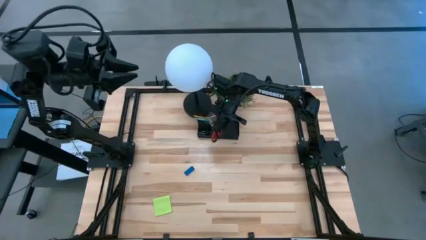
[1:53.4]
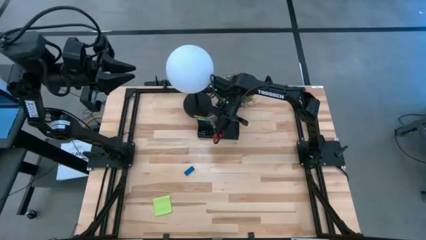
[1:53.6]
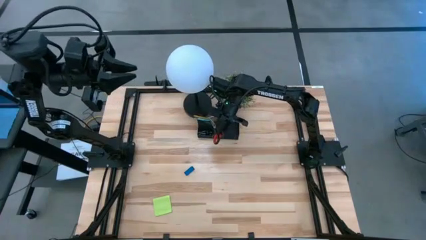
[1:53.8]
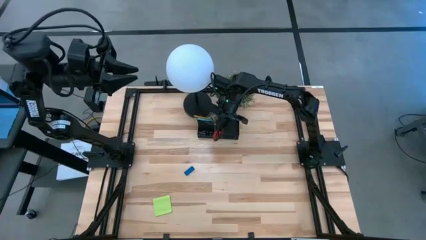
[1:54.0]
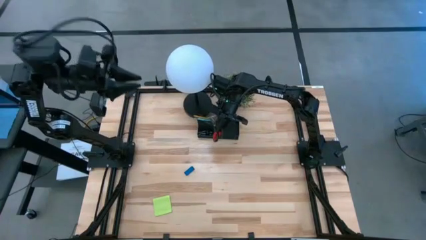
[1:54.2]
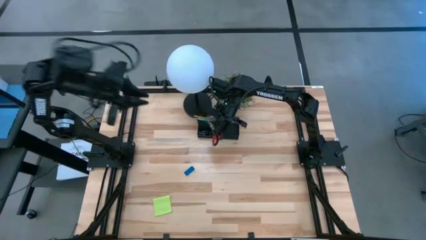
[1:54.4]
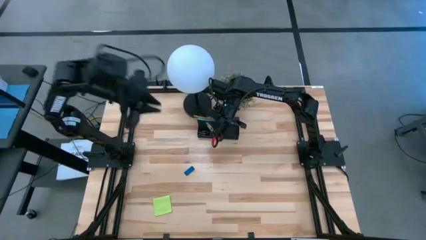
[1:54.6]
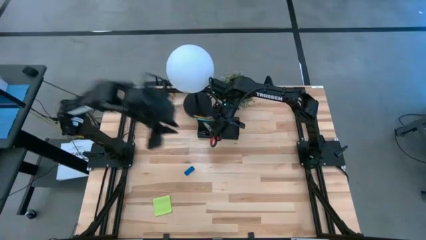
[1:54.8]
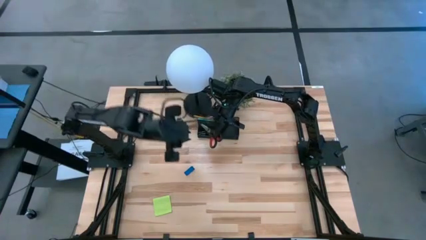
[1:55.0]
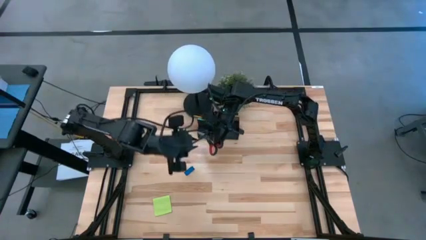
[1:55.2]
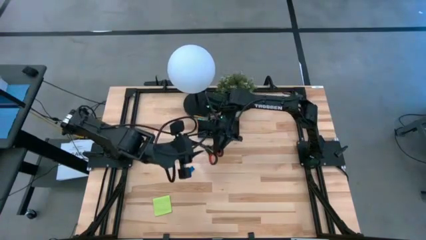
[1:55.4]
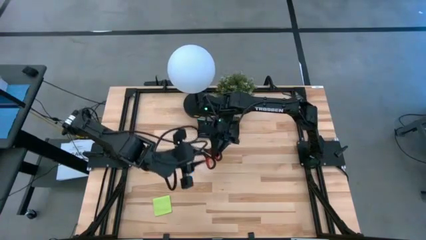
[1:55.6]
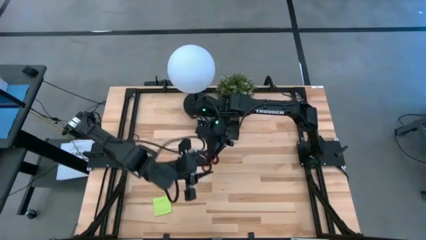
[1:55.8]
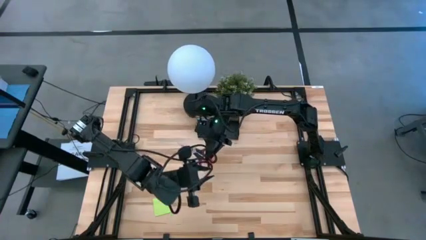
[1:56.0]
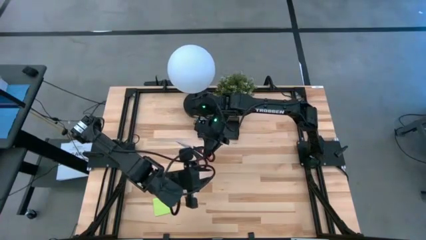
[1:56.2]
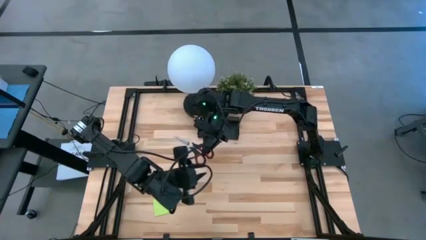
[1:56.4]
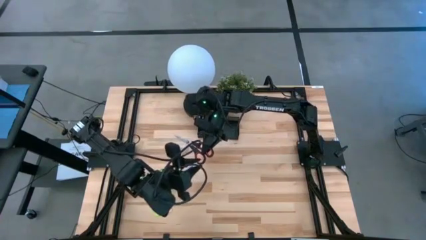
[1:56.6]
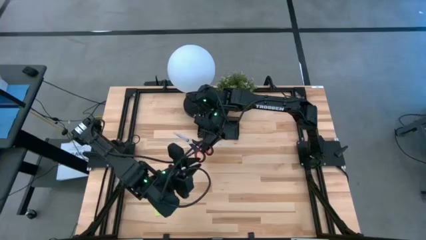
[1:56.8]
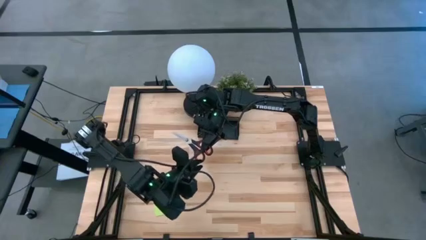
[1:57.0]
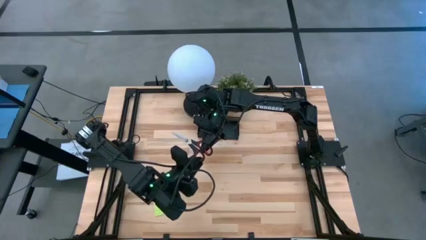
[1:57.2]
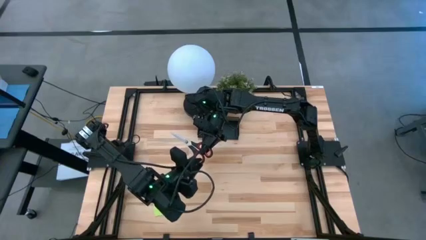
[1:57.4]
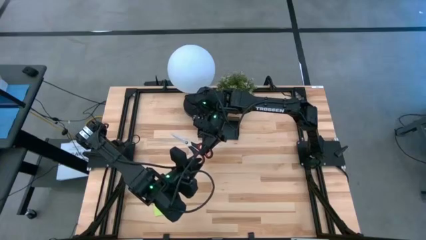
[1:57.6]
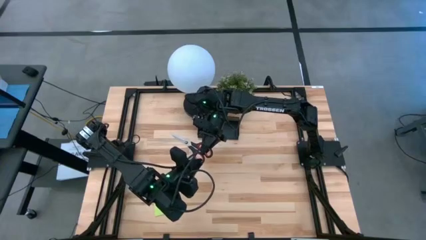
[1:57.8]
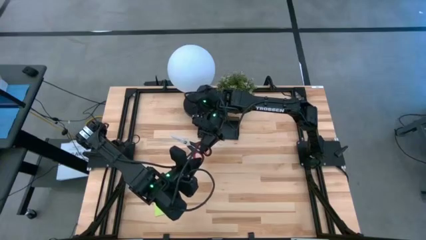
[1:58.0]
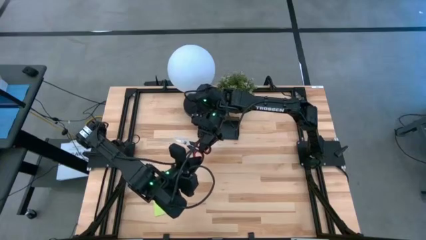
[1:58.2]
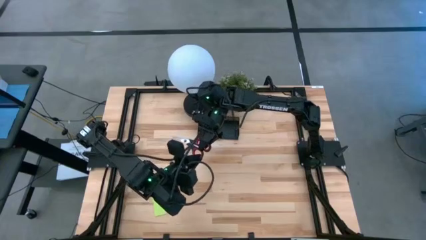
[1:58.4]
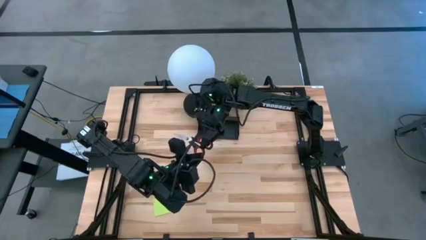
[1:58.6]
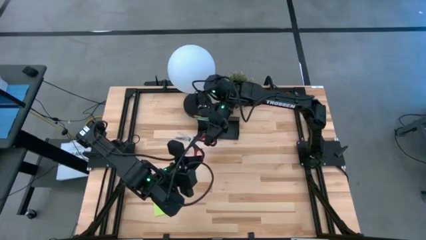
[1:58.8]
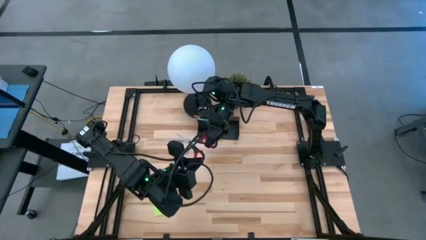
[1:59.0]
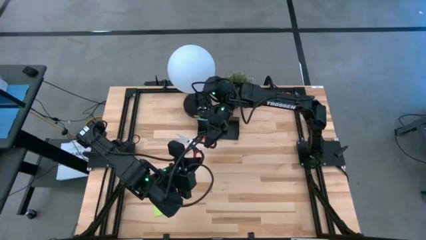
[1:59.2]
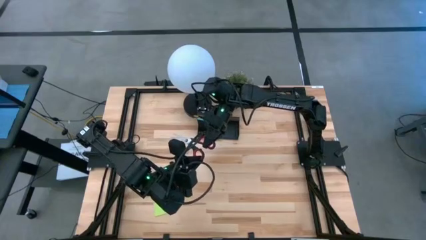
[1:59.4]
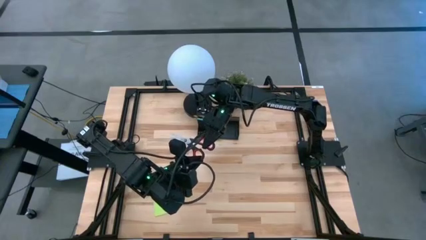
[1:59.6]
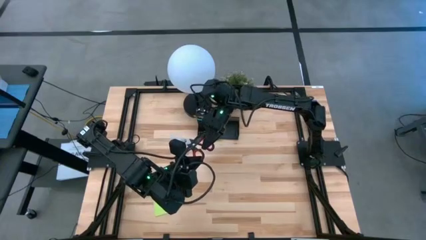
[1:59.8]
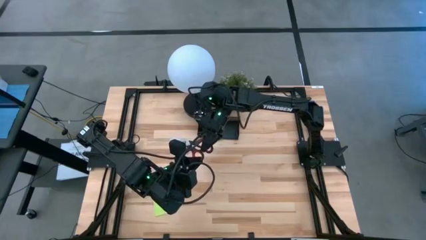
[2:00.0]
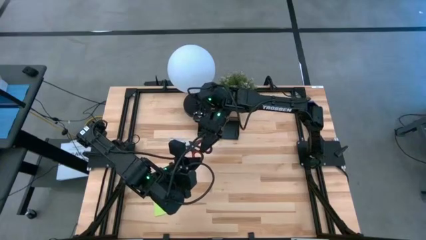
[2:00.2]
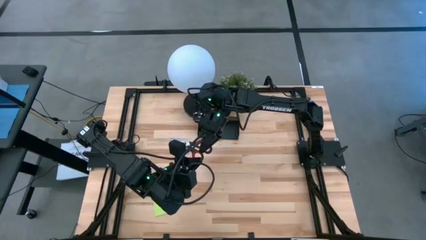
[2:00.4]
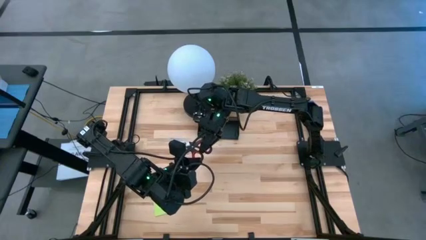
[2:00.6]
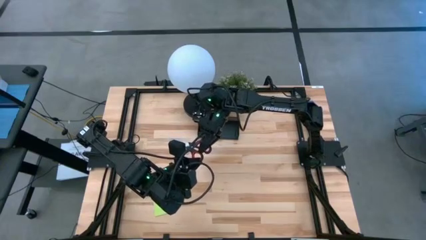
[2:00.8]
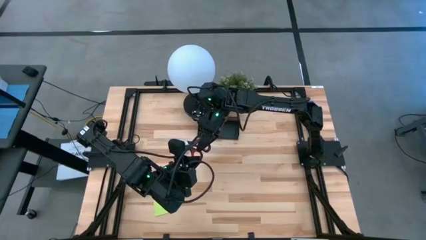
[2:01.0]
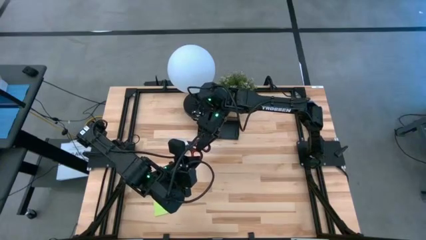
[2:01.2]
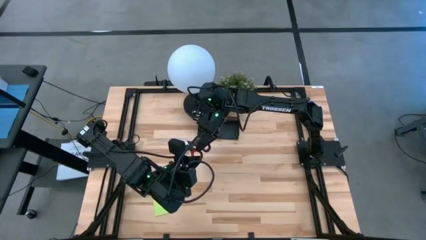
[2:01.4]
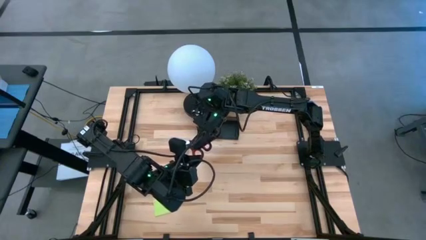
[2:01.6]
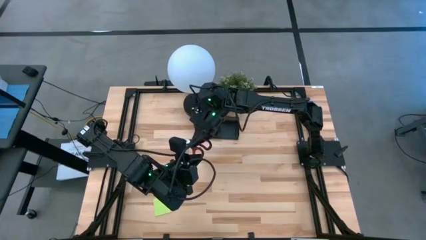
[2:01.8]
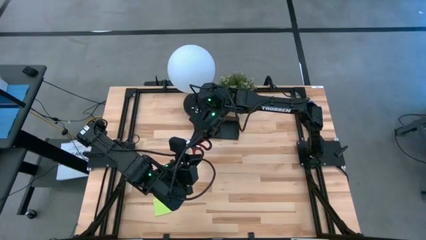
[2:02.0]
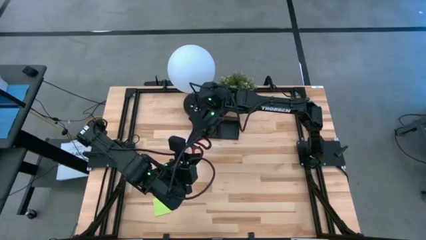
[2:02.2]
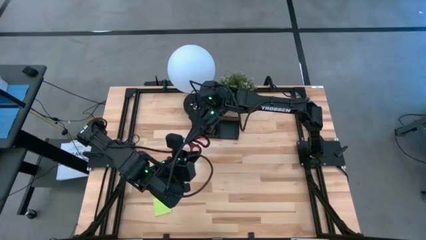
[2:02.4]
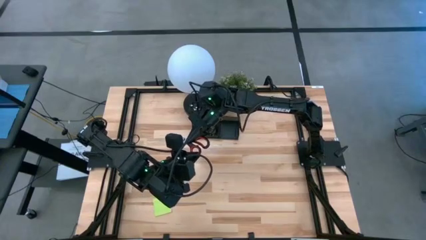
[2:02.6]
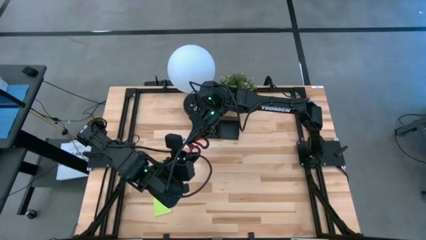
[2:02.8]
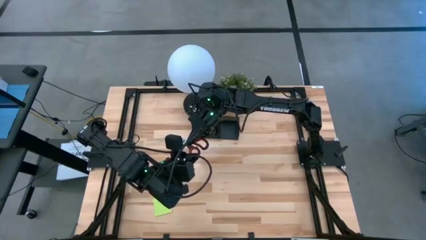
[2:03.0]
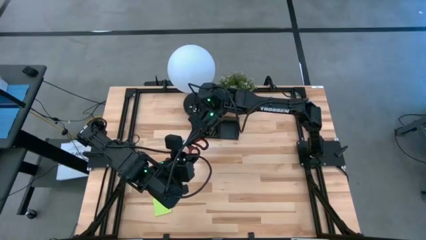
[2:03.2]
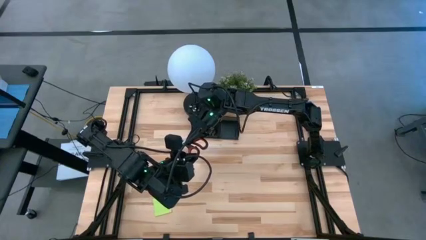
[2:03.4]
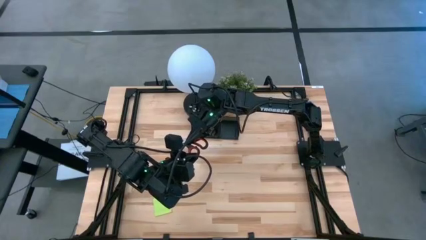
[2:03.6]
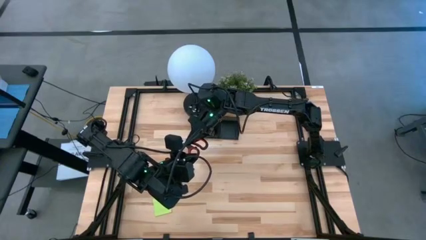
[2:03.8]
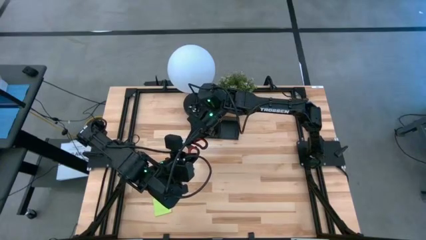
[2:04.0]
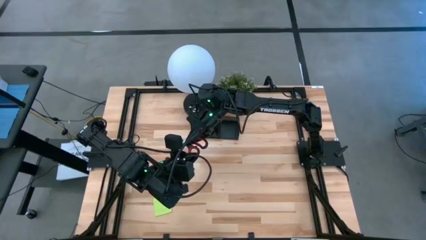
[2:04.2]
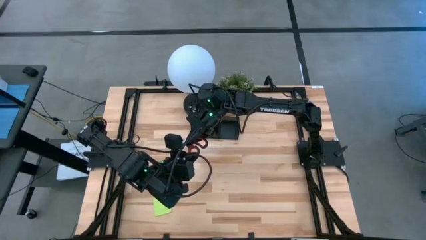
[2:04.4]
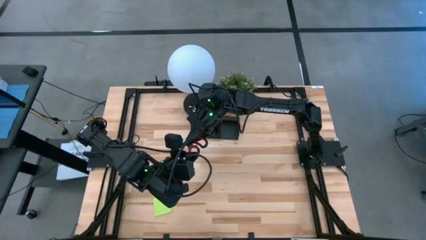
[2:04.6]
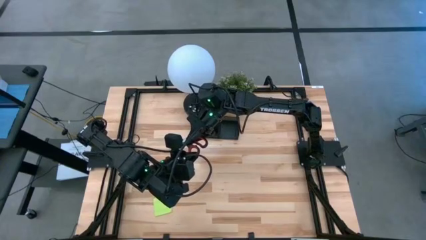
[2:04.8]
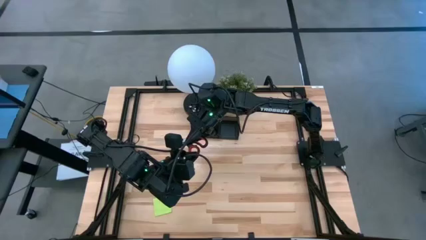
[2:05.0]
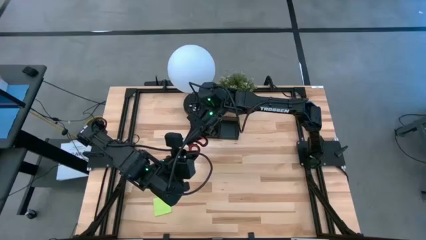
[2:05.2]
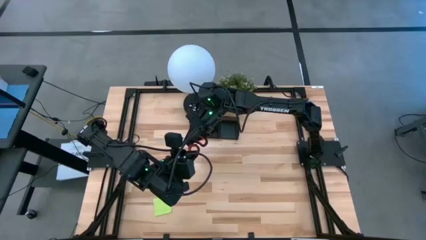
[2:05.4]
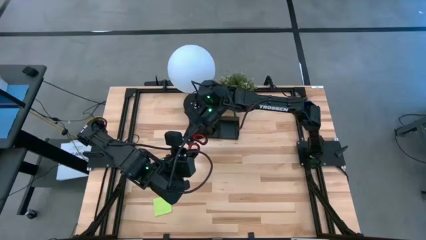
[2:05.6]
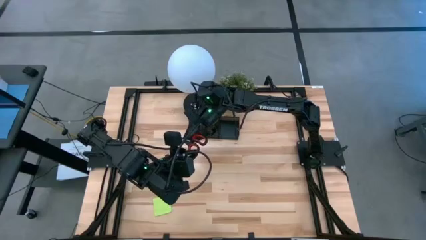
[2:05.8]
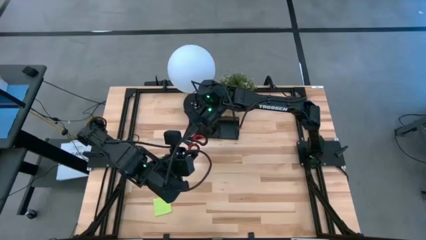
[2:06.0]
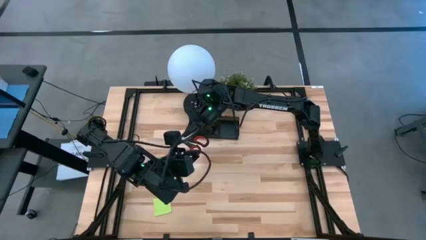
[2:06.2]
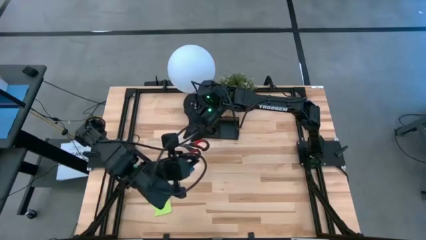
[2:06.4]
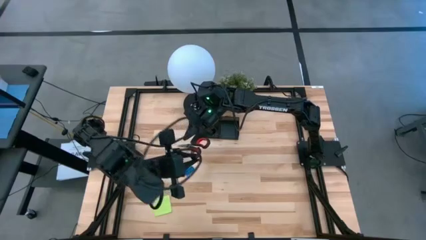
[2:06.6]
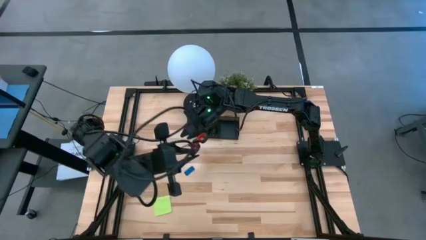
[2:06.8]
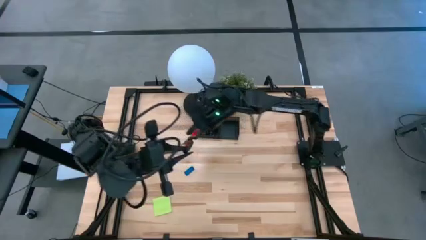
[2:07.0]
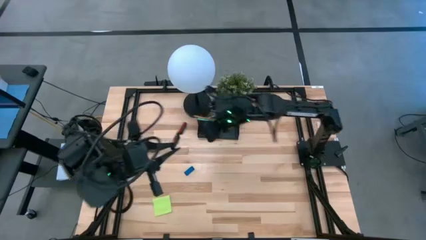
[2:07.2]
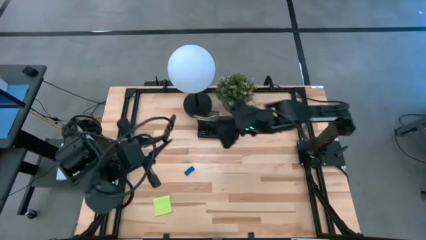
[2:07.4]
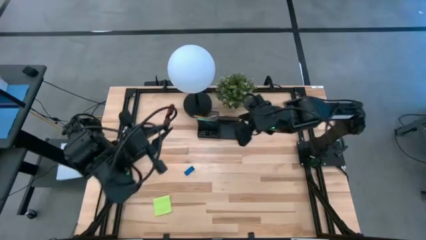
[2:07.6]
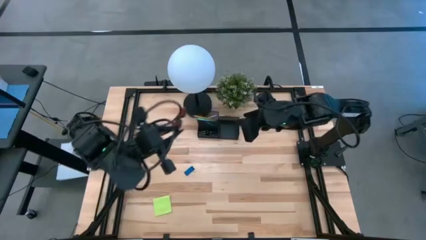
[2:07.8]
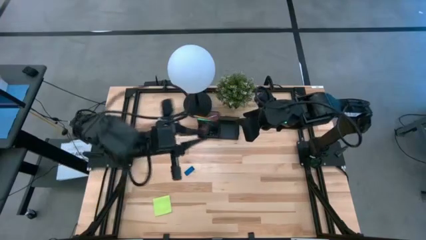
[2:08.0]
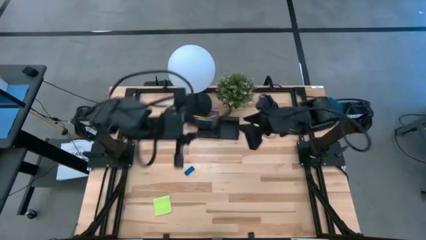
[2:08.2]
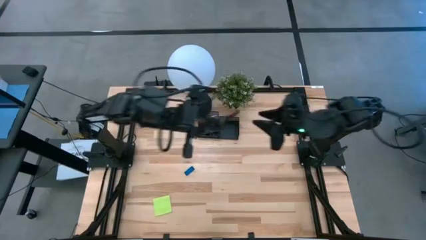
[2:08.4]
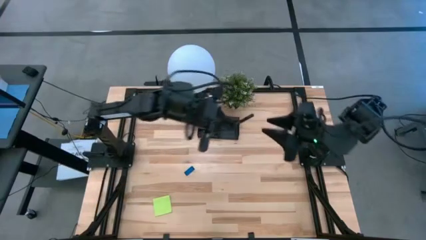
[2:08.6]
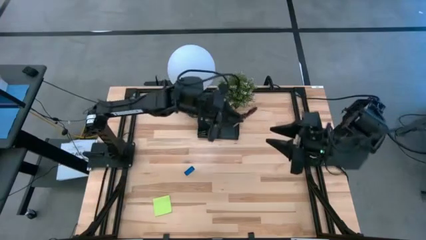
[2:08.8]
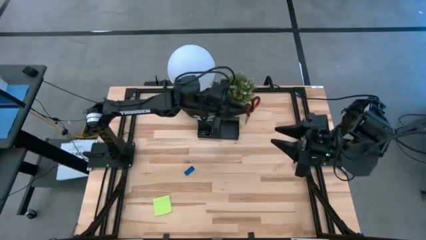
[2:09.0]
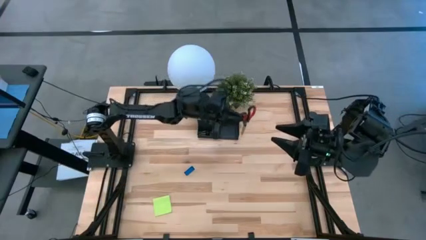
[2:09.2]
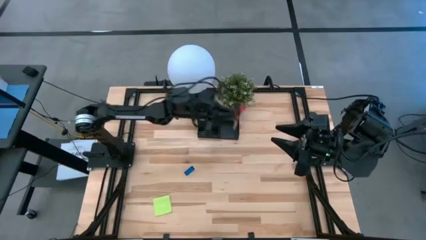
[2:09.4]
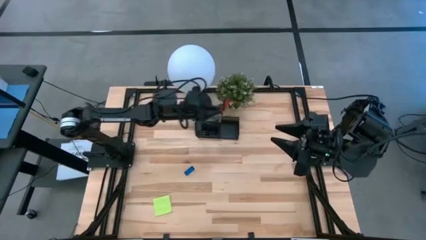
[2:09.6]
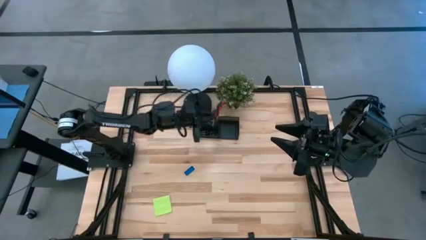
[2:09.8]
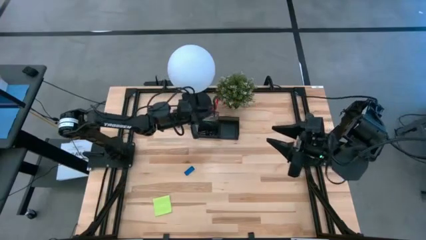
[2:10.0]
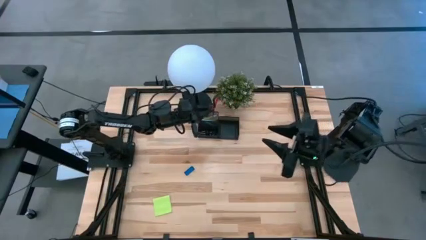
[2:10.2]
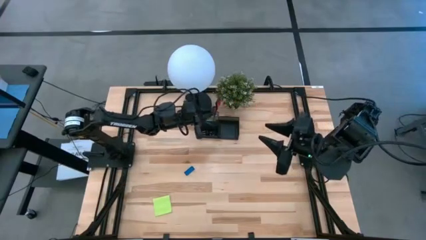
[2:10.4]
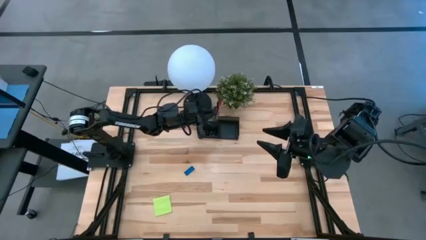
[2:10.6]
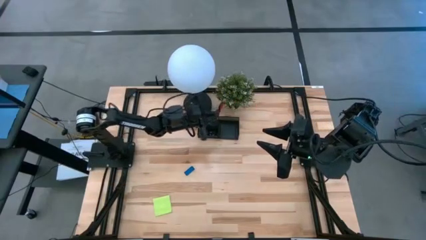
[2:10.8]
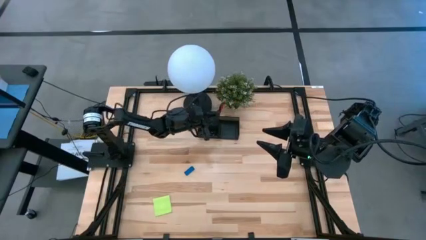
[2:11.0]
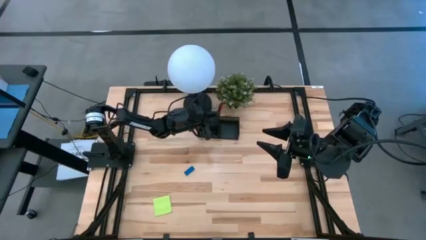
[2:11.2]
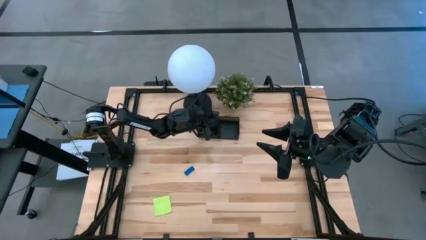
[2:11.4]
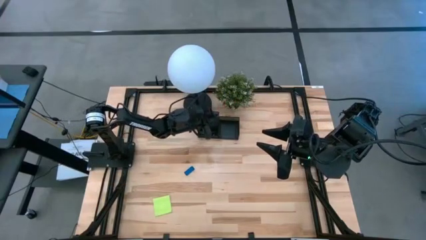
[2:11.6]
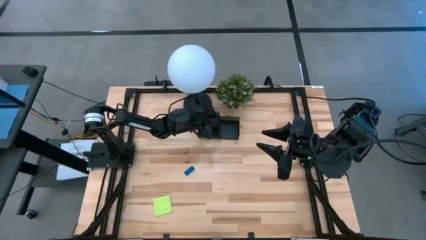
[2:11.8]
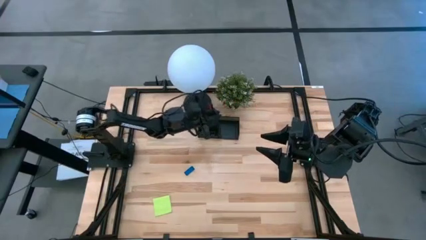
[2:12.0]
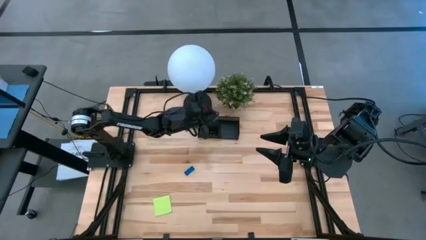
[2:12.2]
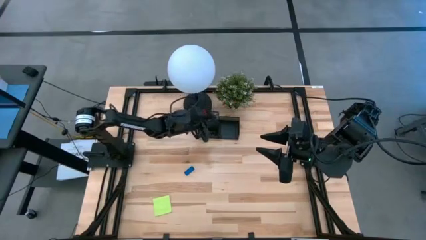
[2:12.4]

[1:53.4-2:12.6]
Task: Pick and place office supplies into organizer
Put the black scissors into the black desk organizer
